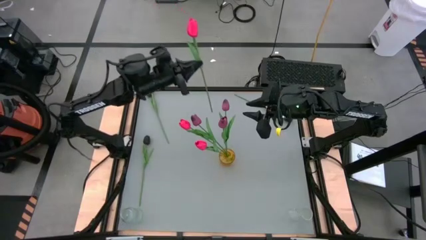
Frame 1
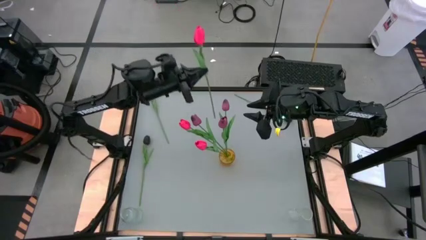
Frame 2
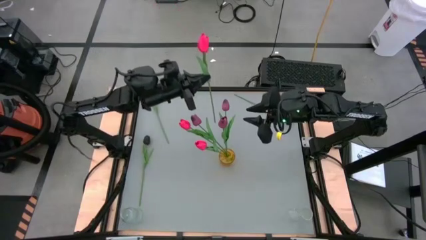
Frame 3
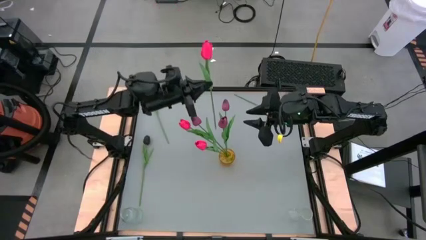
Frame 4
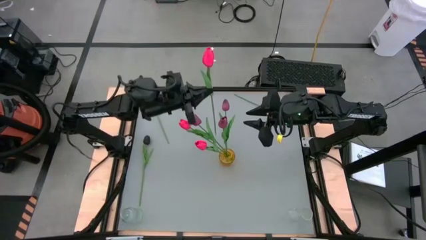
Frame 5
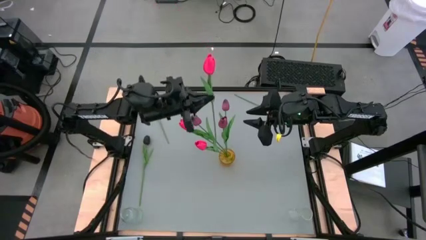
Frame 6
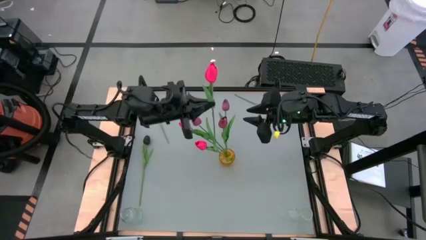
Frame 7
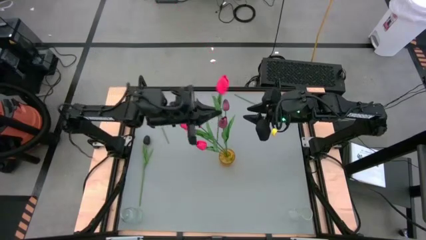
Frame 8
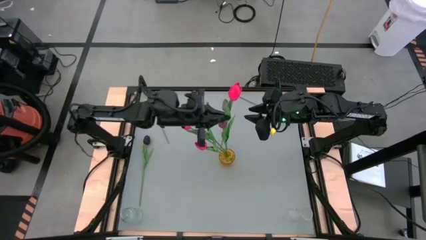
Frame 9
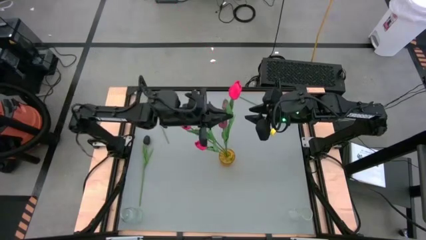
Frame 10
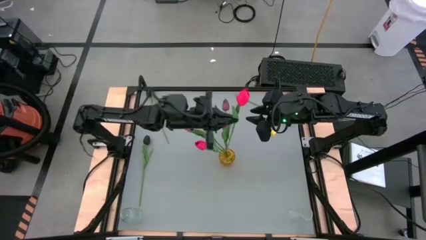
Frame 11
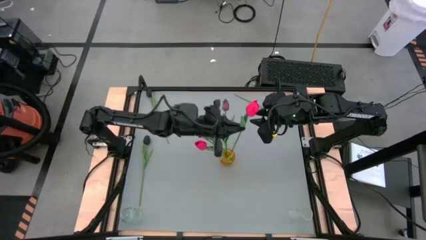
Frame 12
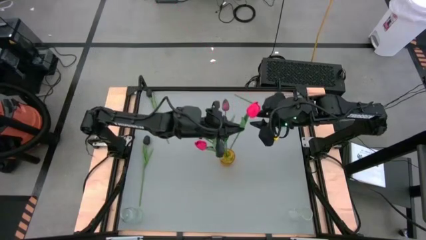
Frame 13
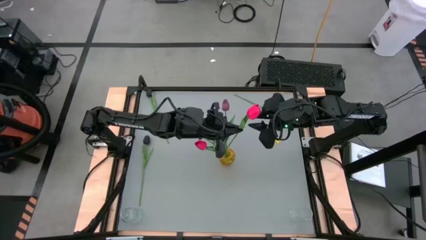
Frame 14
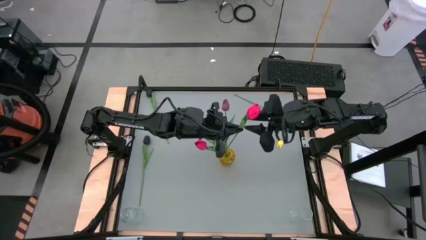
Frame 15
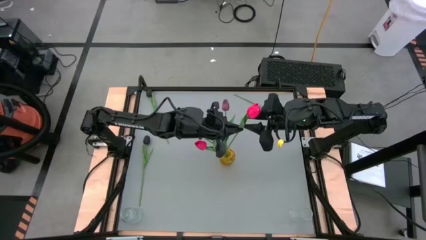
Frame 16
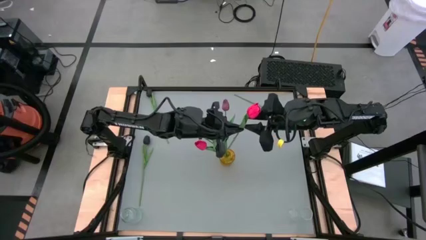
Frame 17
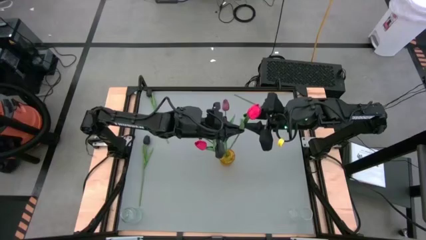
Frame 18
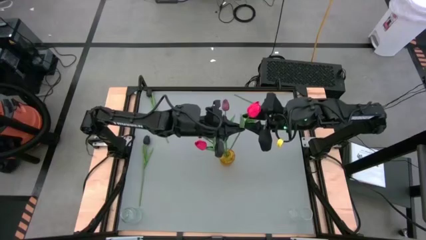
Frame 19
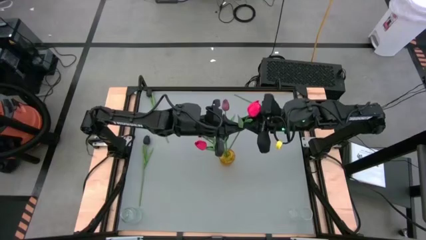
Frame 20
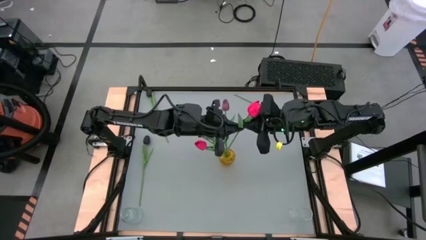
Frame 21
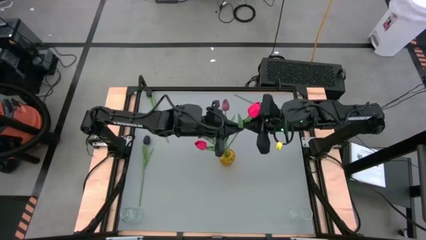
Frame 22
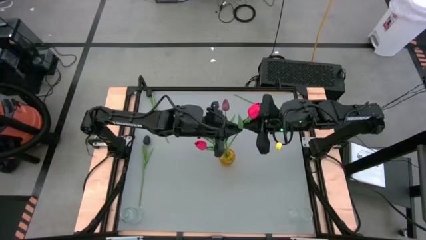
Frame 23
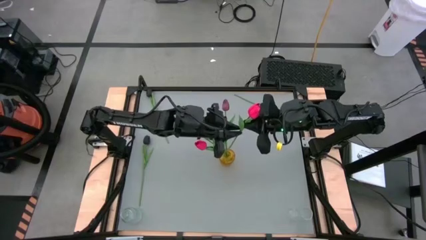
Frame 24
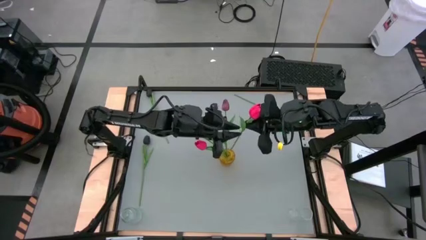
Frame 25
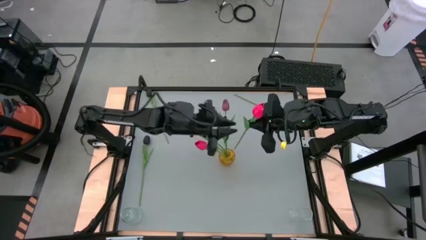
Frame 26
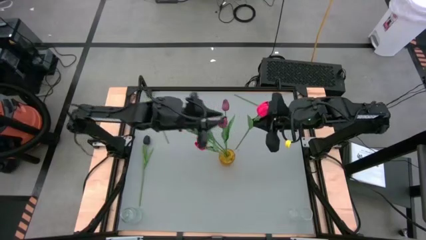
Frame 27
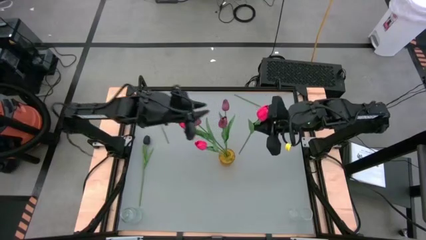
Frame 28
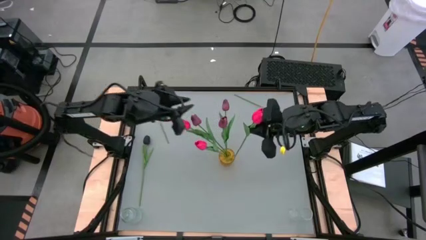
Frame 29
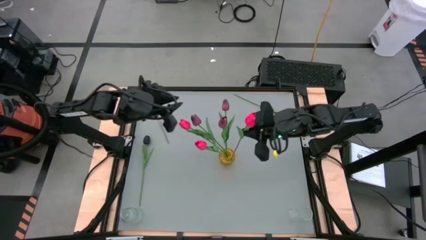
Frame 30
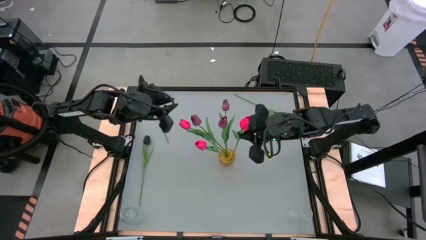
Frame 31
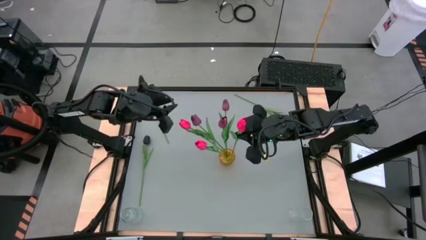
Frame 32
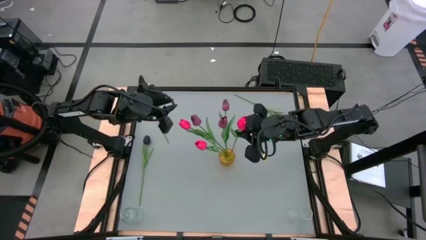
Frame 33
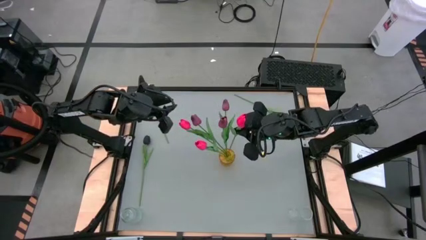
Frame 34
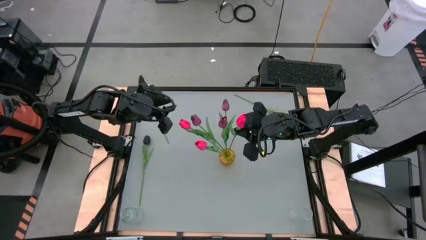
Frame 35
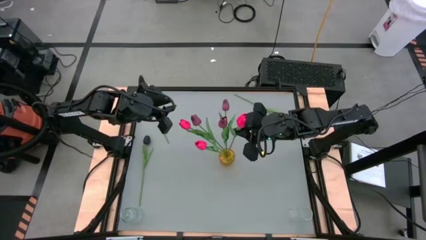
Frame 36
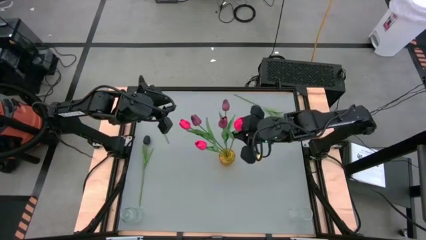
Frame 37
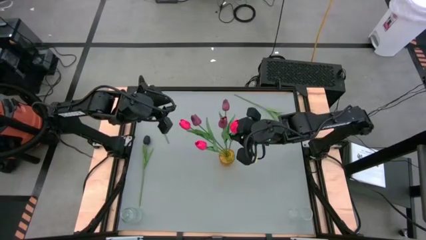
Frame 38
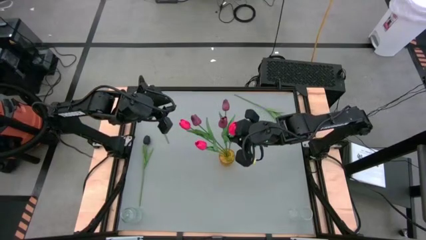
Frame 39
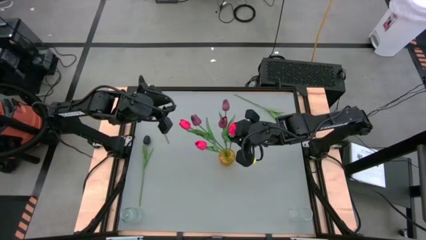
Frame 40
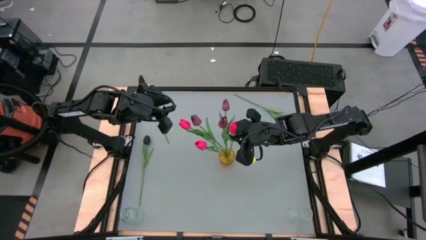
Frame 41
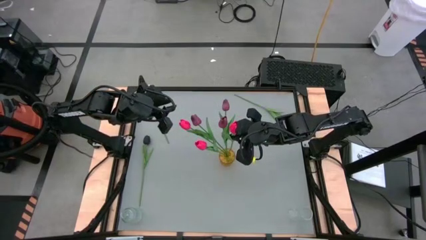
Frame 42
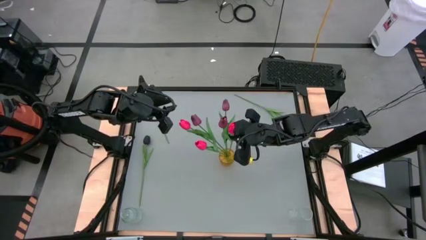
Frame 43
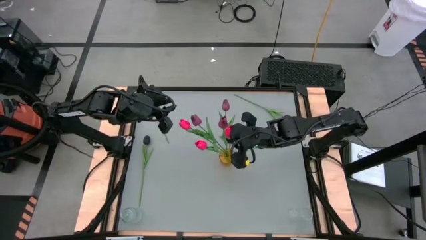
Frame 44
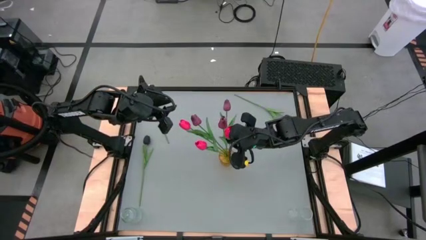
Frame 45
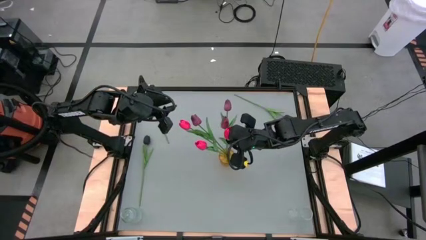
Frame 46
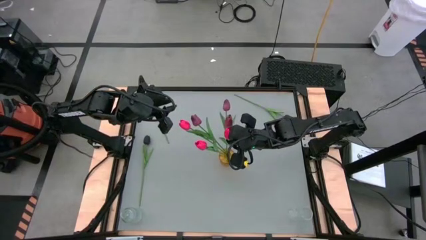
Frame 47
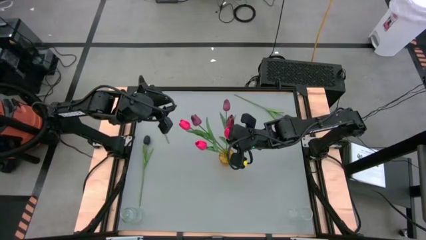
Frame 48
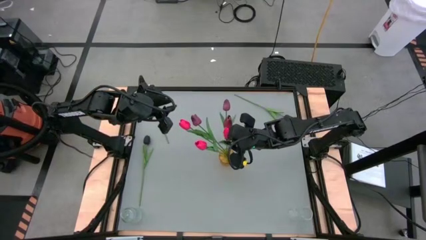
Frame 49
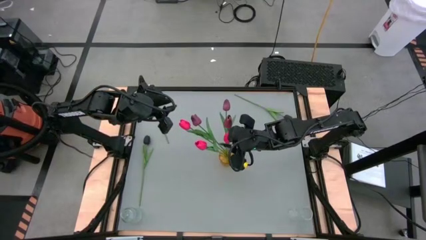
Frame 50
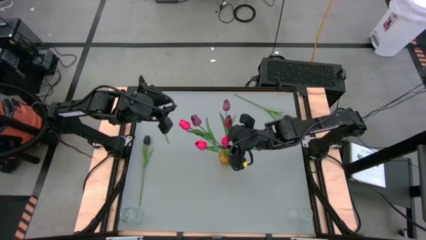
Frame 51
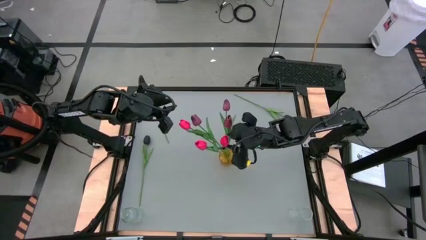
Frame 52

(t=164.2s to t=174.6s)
Task: Sort flowers into vase by color
Put the pink flower into the yellow vase
